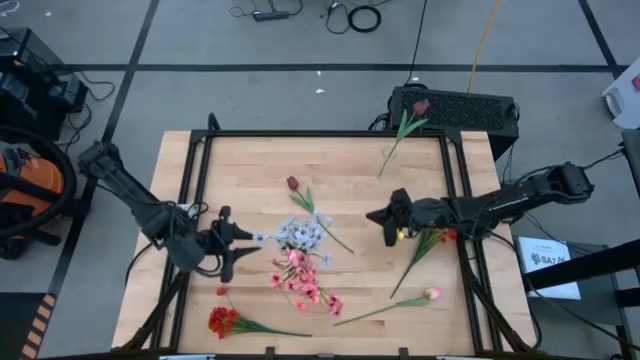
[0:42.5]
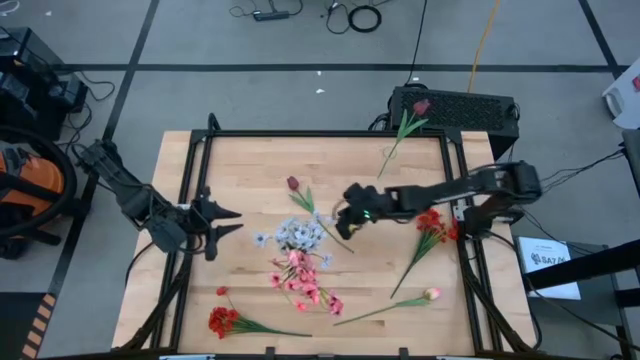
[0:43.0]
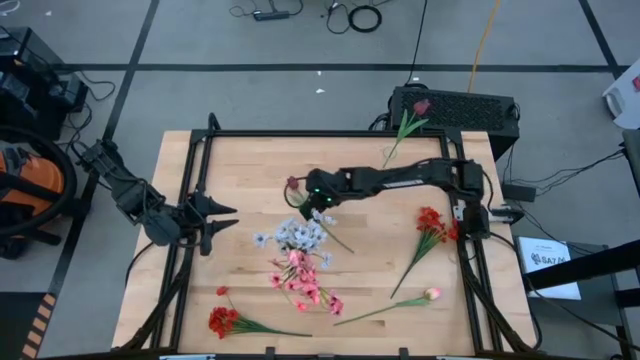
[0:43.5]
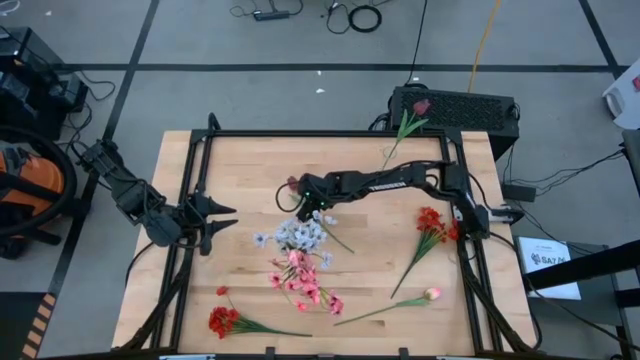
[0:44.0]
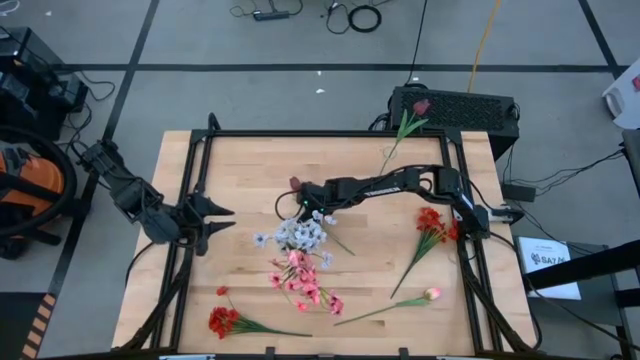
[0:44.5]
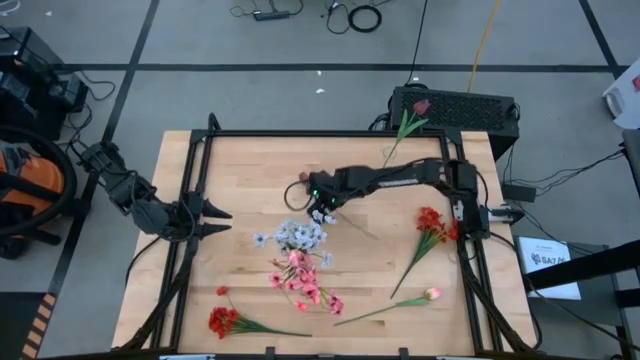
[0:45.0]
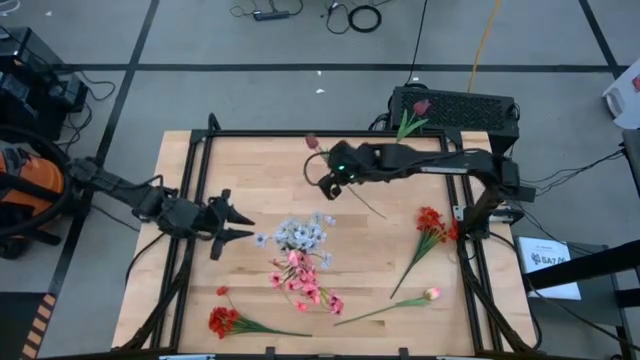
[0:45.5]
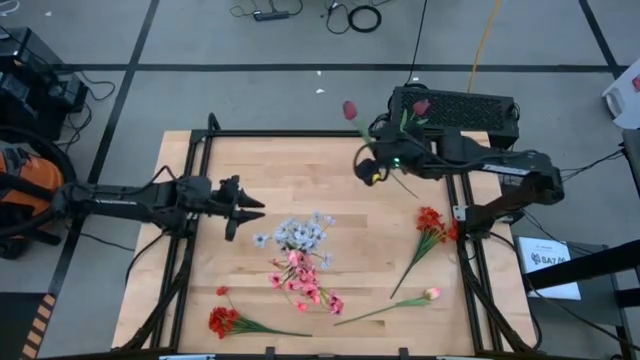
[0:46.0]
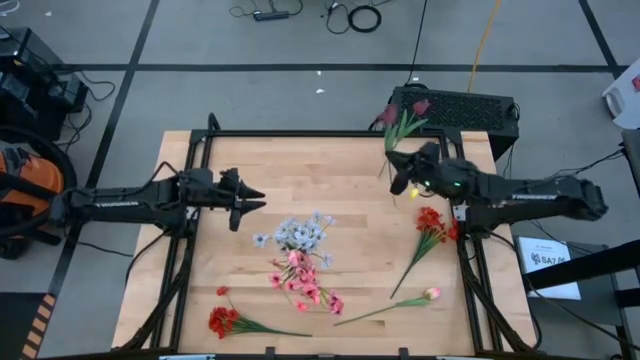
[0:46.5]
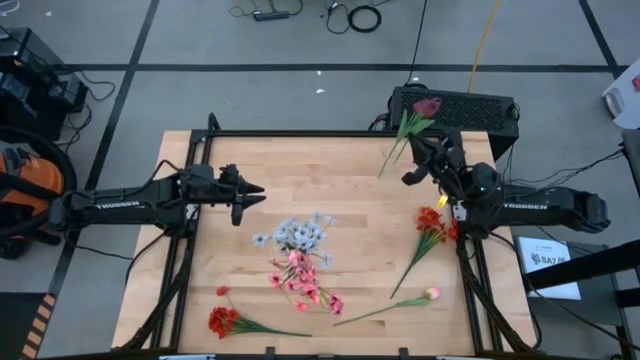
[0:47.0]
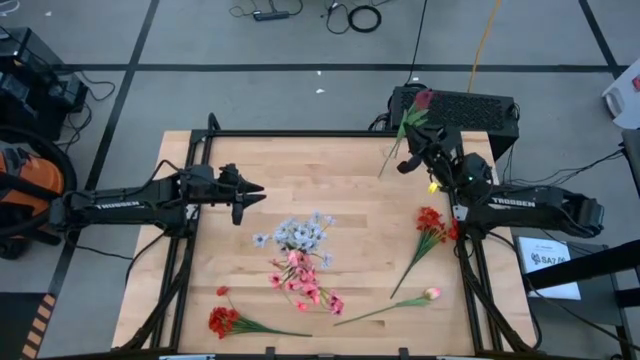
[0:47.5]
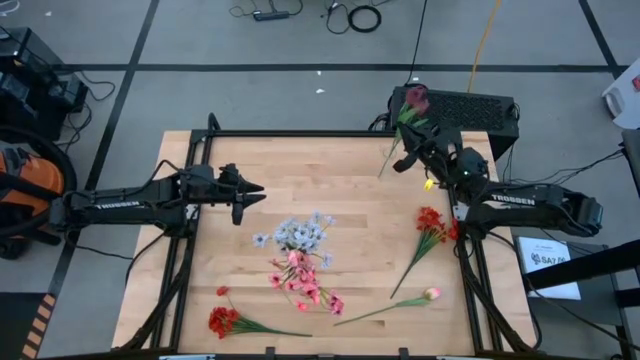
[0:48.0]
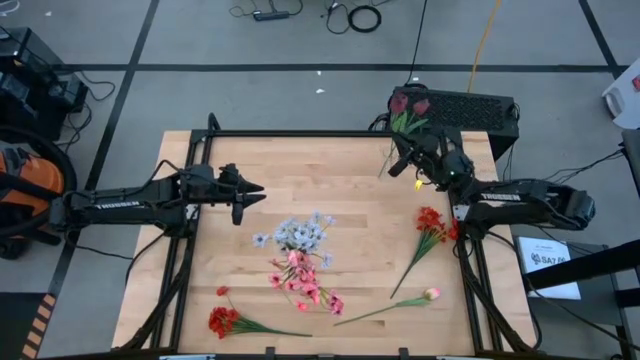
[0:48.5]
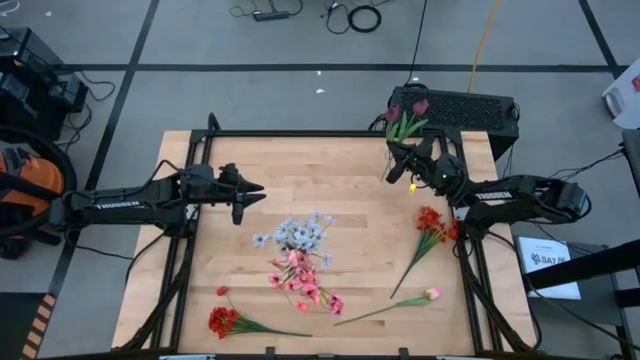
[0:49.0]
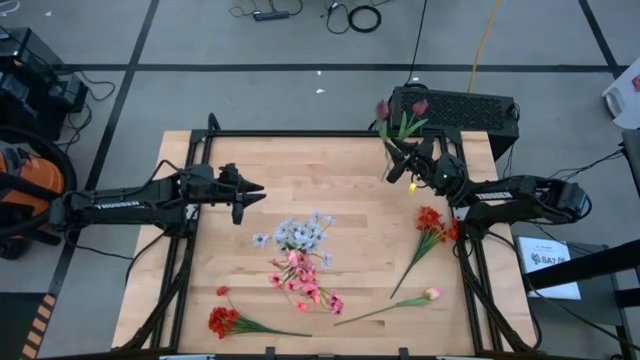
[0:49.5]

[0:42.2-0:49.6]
Task: Sort flowers into vase by color
Put the dark red flower into the transparent vase

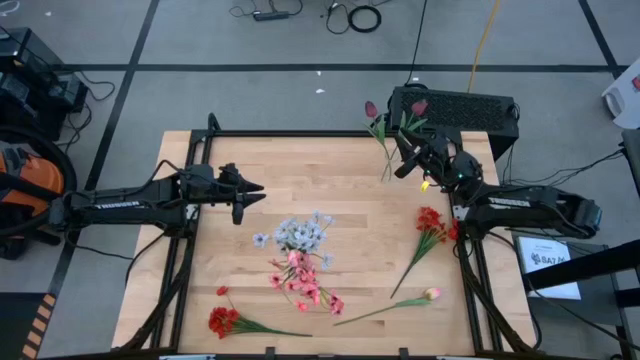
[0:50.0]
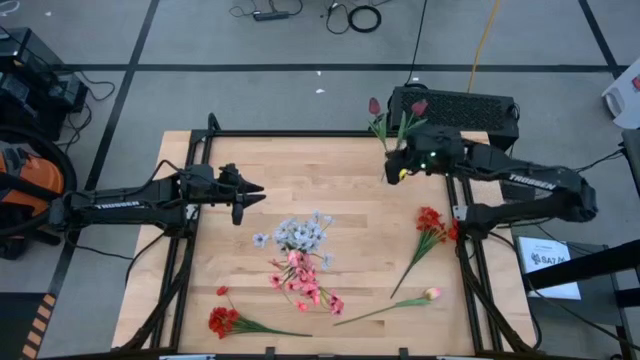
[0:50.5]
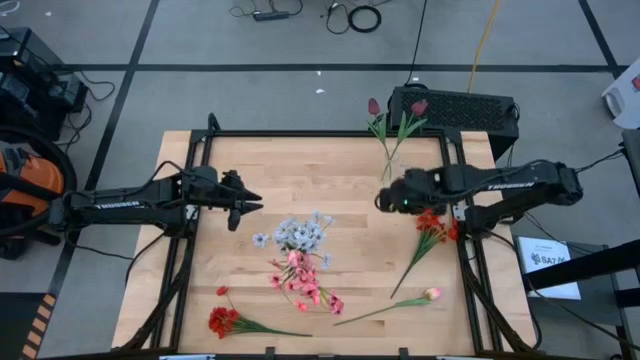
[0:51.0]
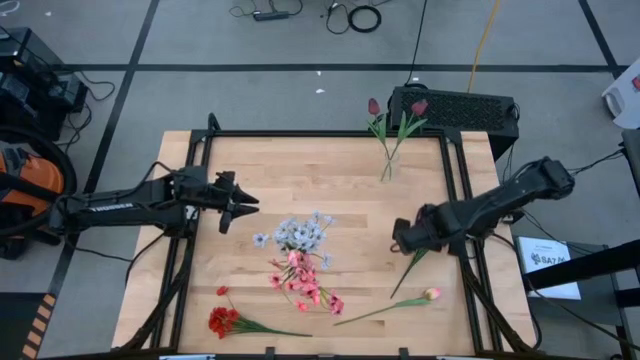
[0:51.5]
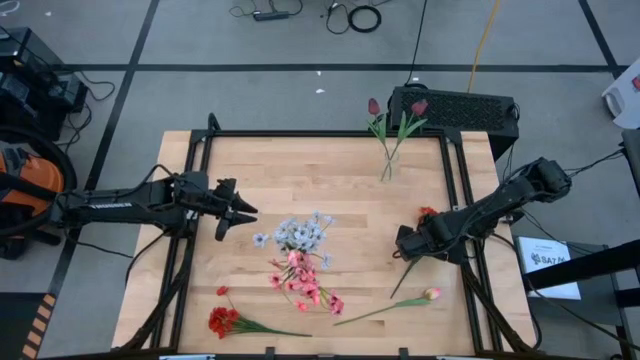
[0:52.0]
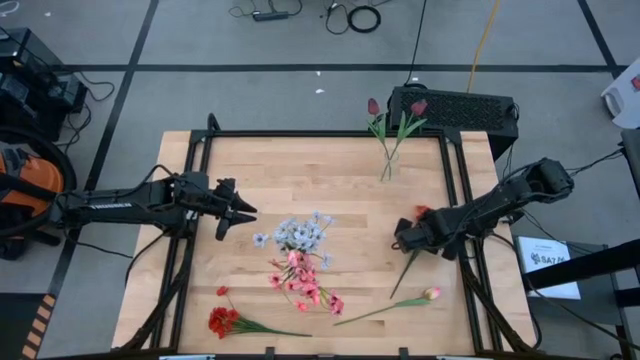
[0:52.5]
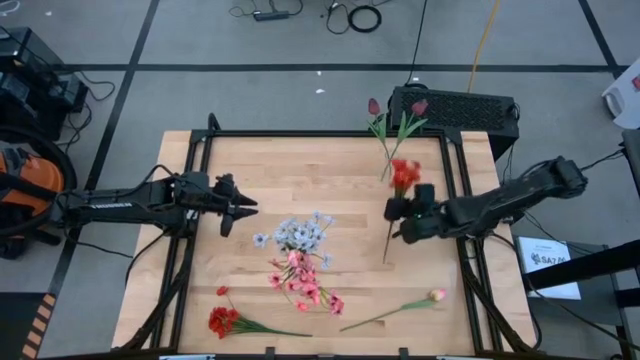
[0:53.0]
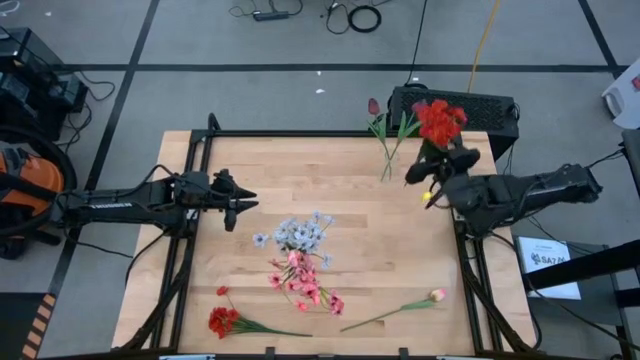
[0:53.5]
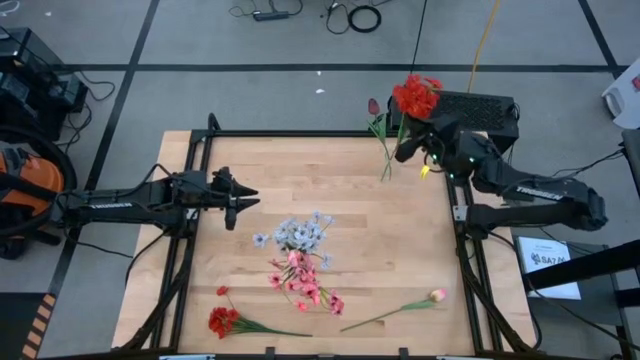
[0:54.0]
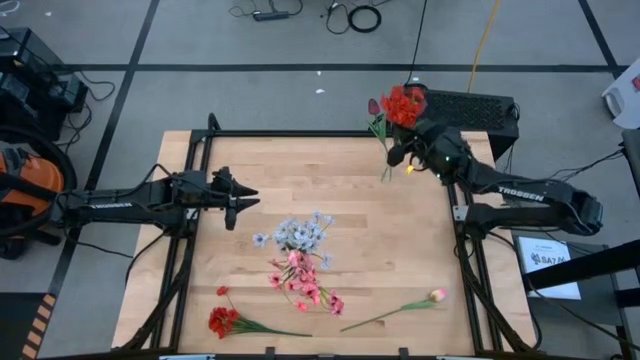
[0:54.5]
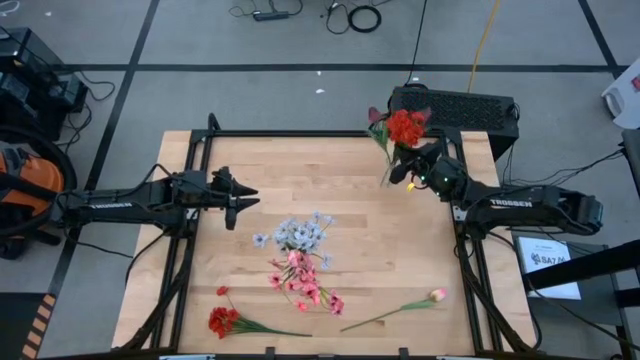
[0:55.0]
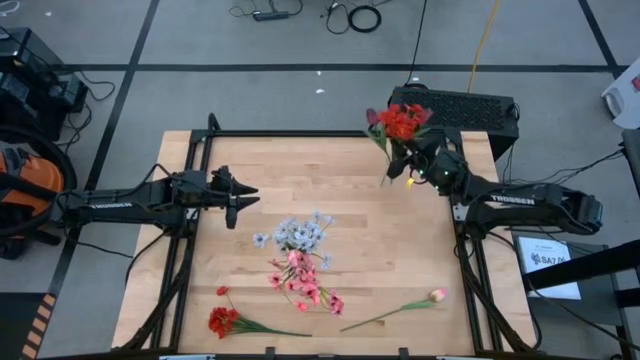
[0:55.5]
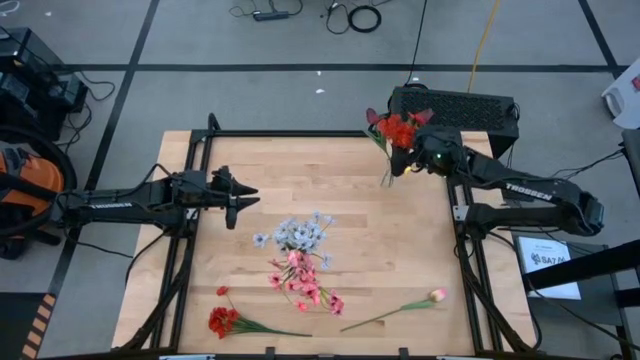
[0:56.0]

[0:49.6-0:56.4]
Put the top red flowers into the transparent vase

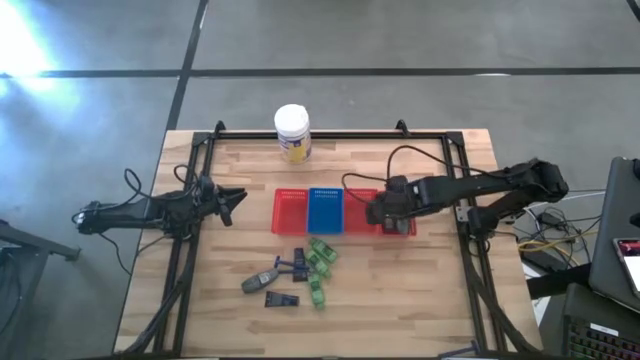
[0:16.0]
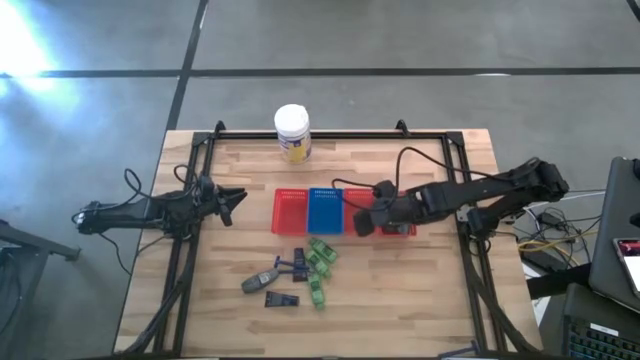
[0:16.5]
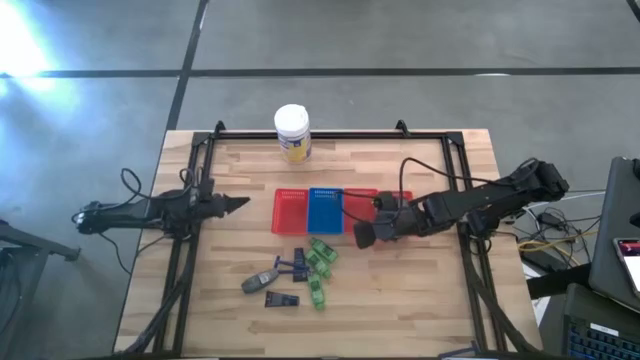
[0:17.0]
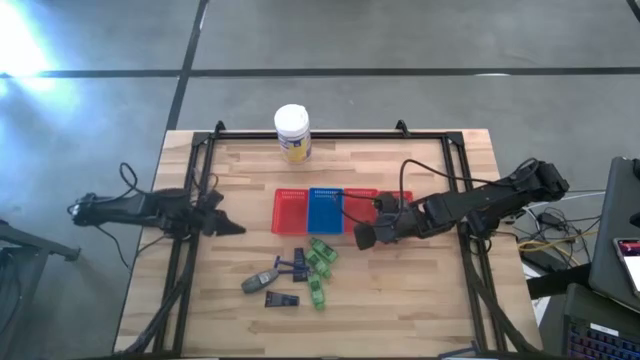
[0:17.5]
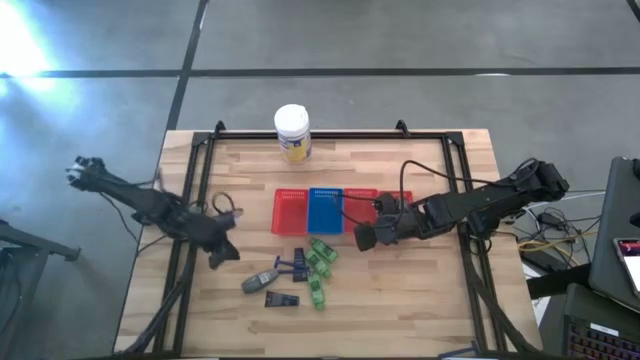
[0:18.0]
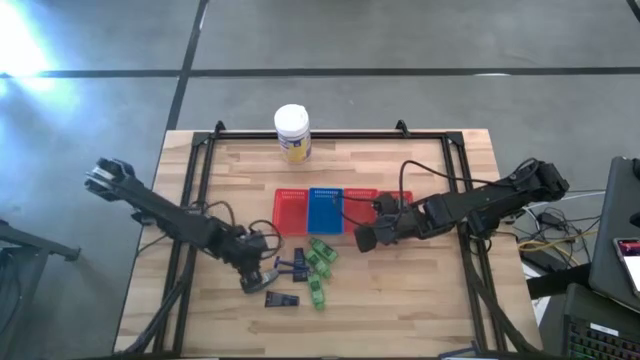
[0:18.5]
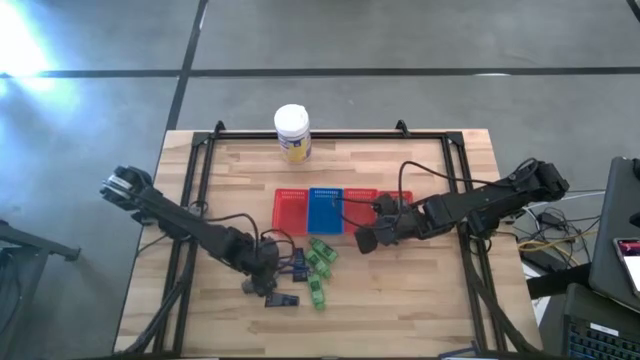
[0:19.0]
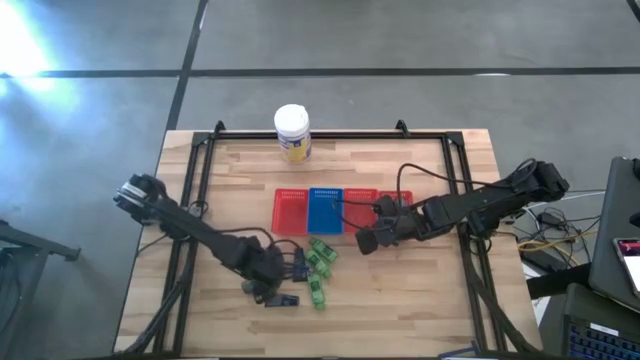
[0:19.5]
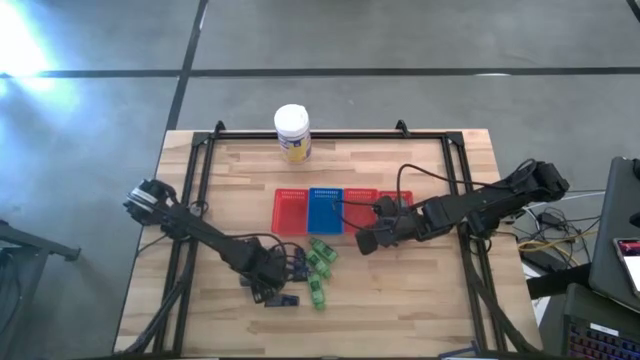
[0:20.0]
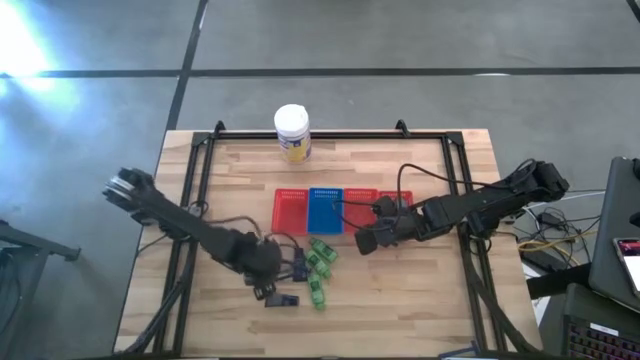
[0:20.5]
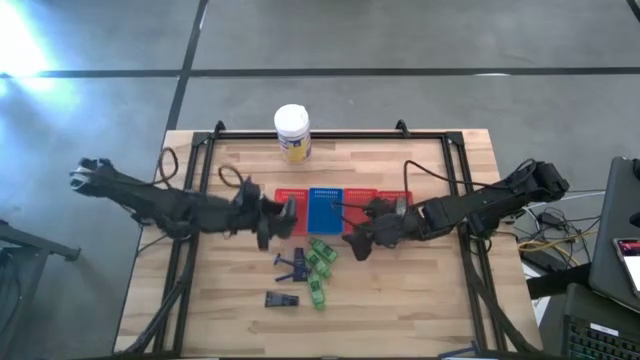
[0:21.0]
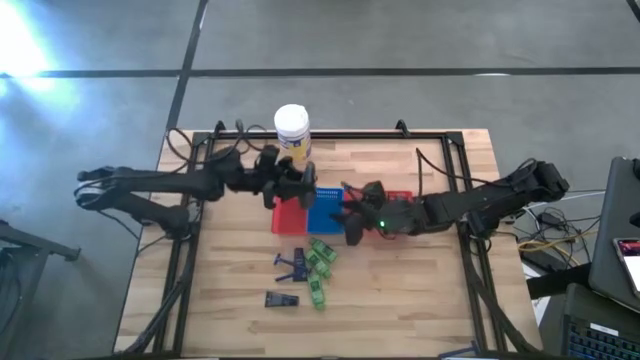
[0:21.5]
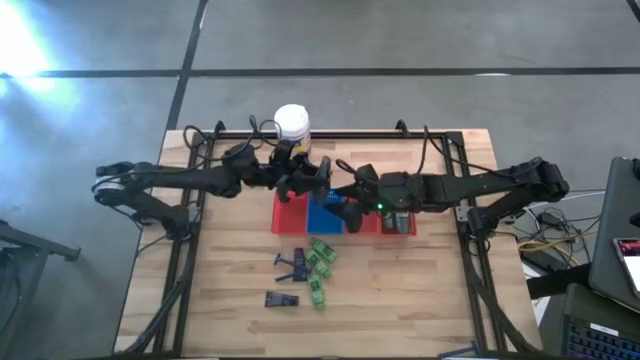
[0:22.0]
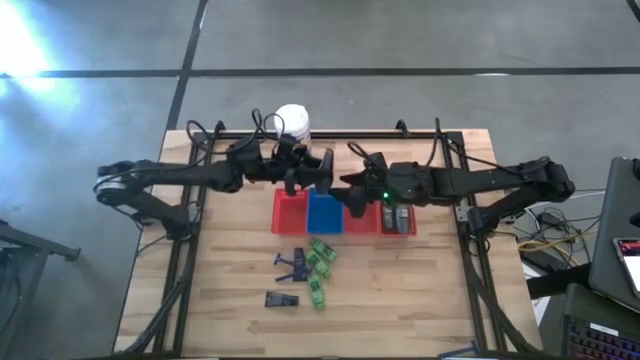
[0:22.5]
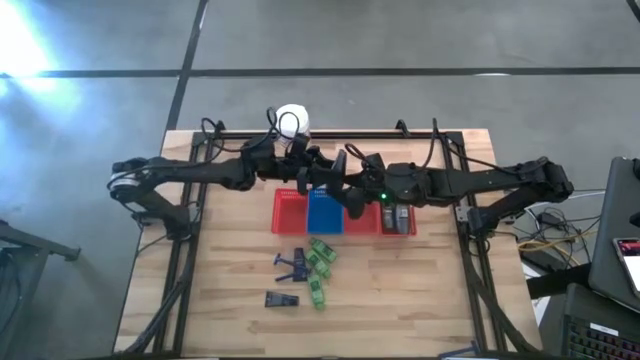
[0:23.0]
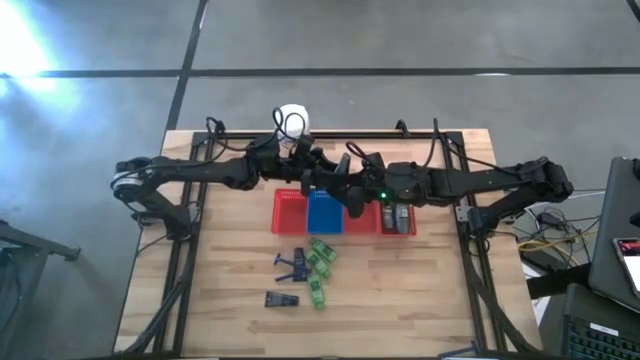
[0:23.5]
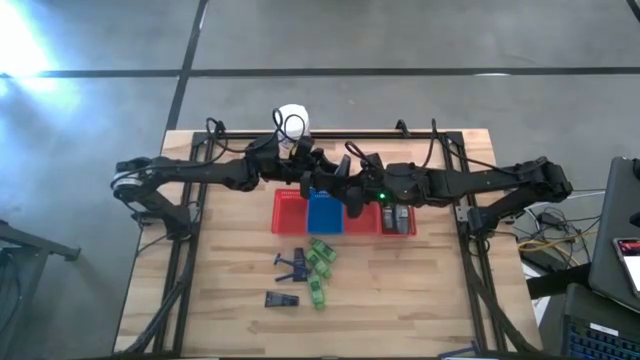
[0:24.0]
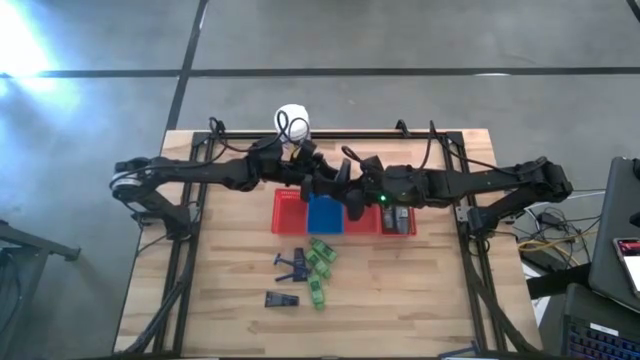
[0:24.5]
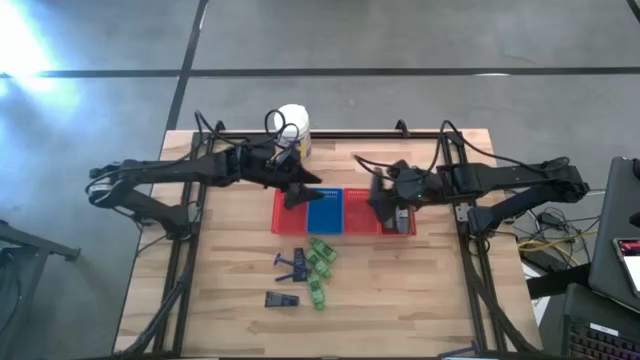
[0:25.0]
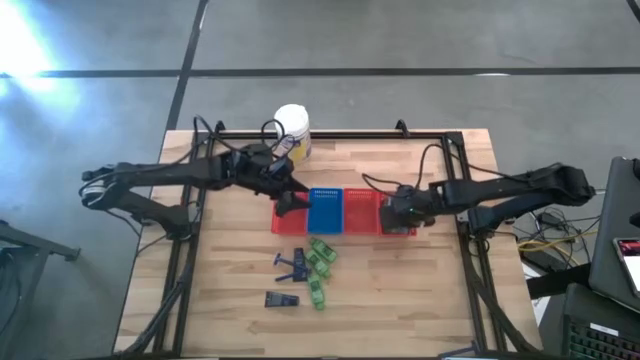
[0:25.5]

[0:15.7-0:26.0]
Task: Pick & Place Travel size toiletries
Put the deodorant into the right red bin
